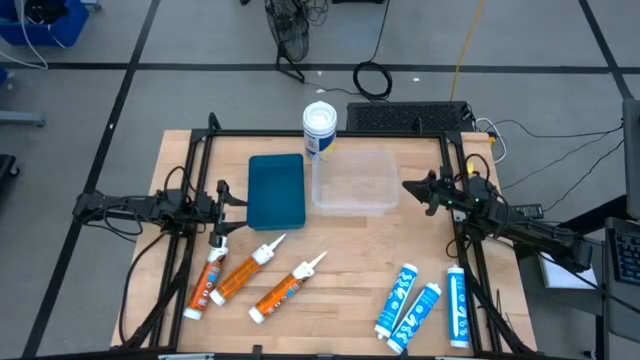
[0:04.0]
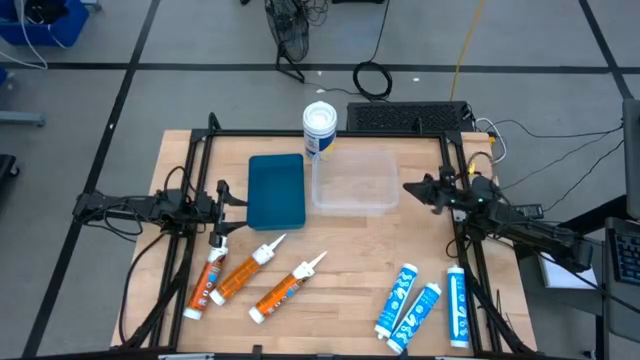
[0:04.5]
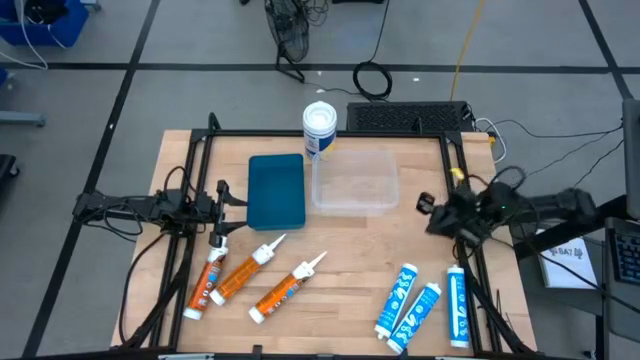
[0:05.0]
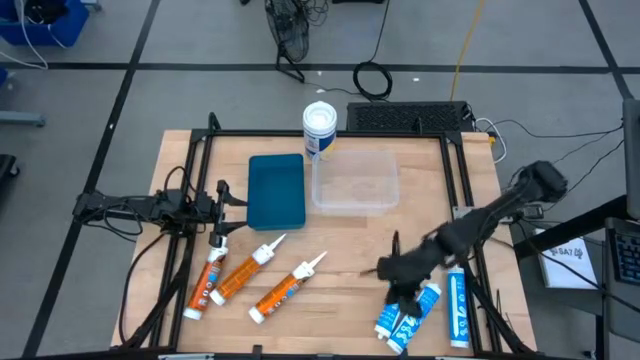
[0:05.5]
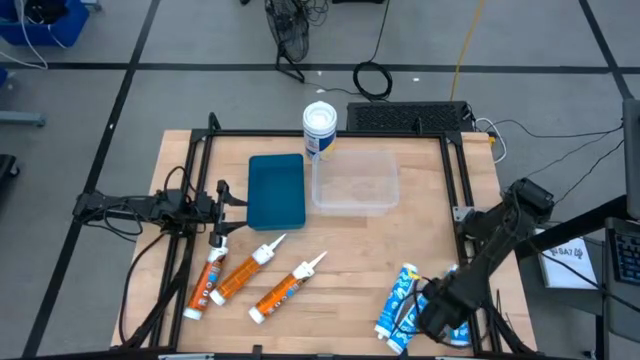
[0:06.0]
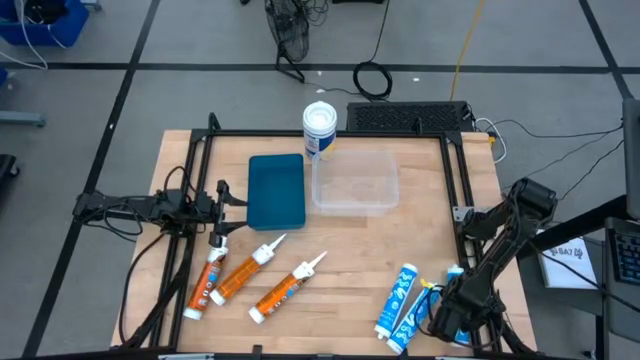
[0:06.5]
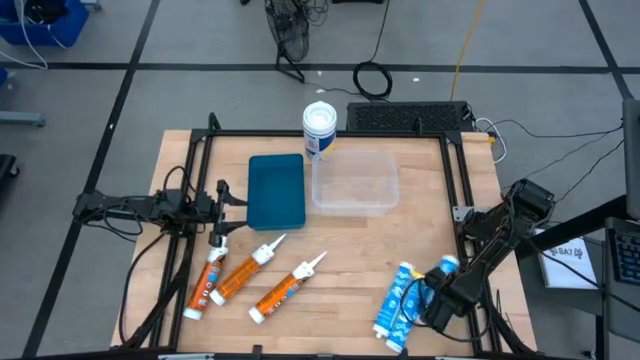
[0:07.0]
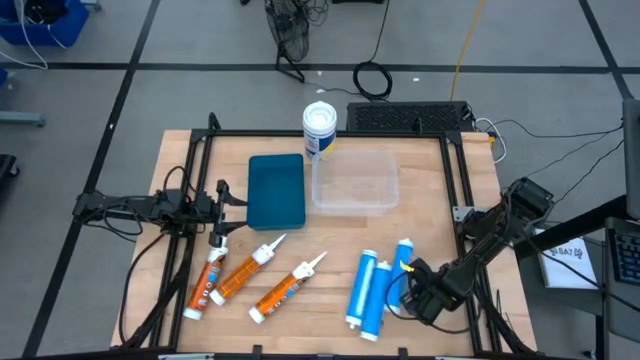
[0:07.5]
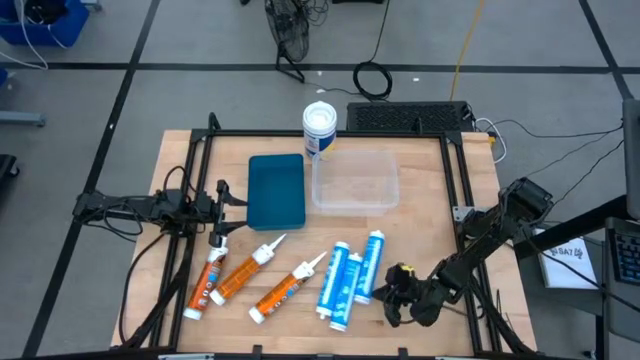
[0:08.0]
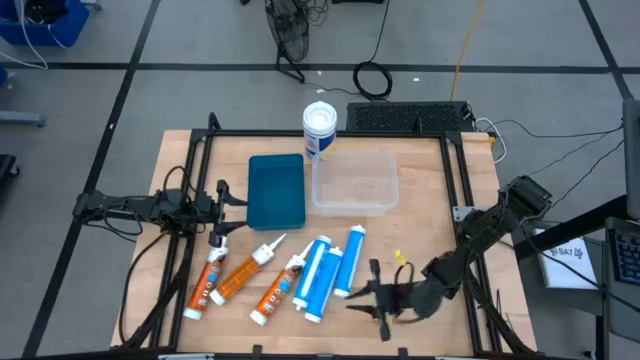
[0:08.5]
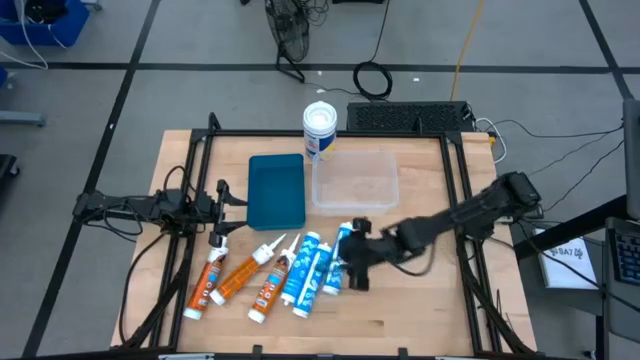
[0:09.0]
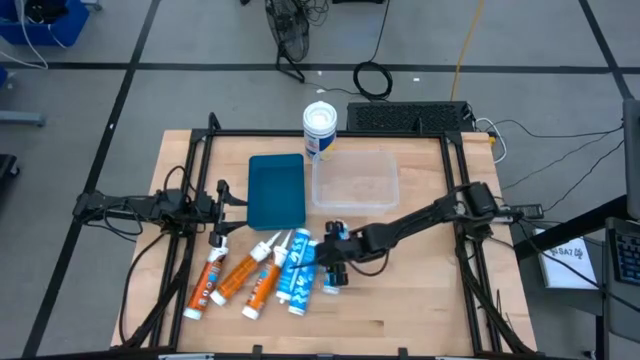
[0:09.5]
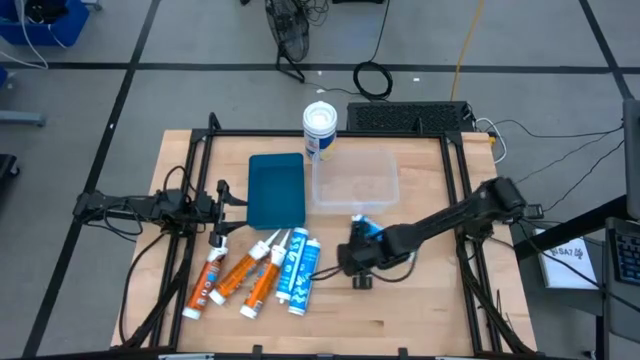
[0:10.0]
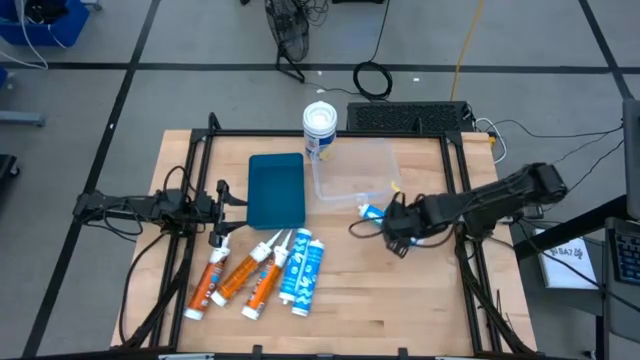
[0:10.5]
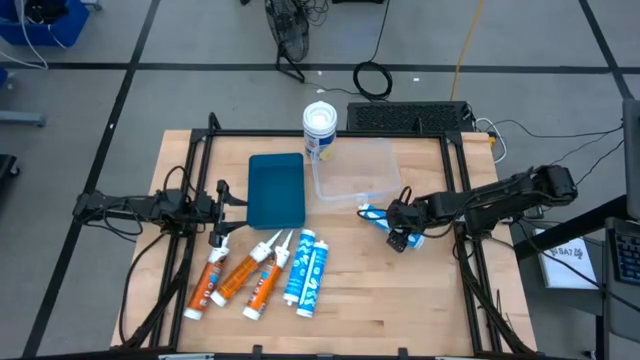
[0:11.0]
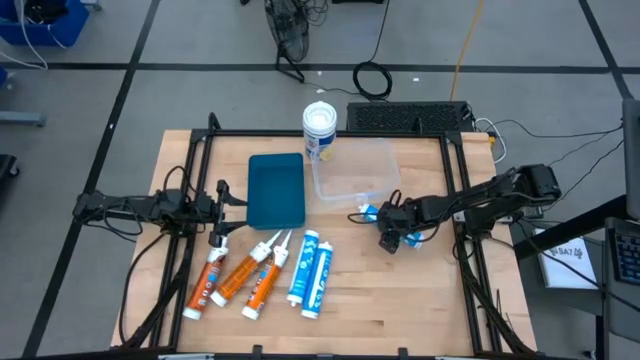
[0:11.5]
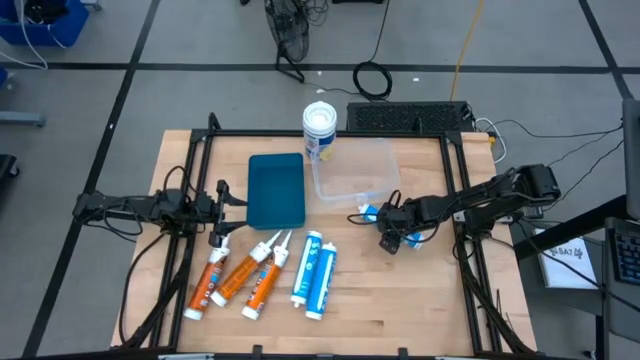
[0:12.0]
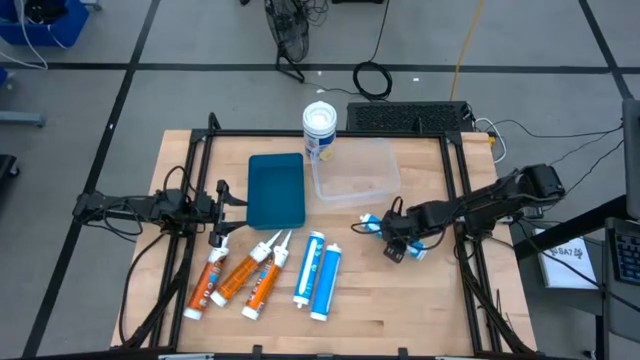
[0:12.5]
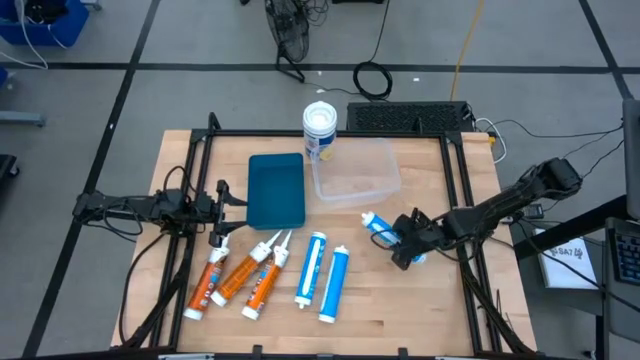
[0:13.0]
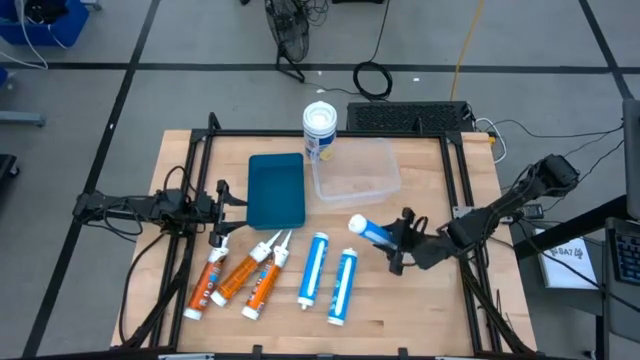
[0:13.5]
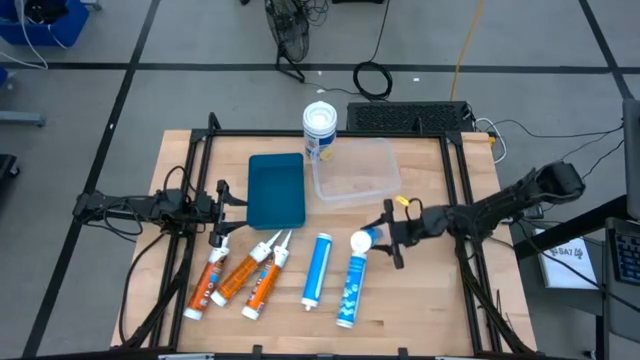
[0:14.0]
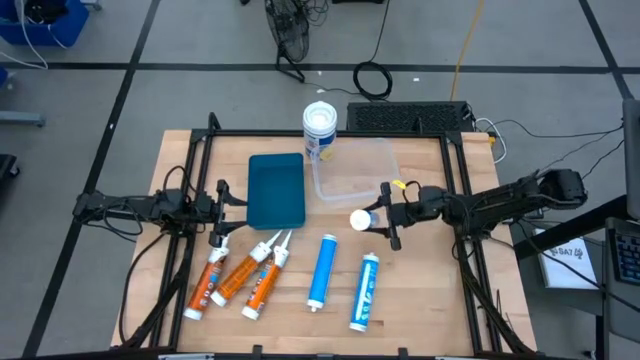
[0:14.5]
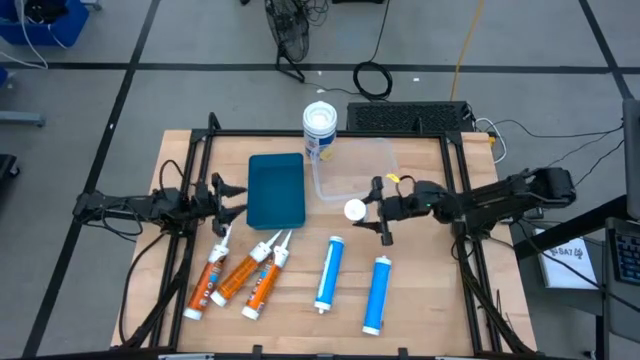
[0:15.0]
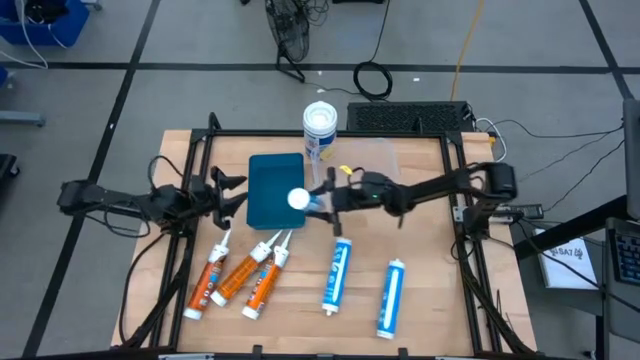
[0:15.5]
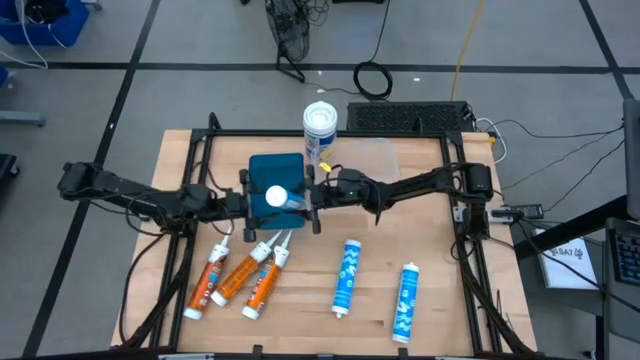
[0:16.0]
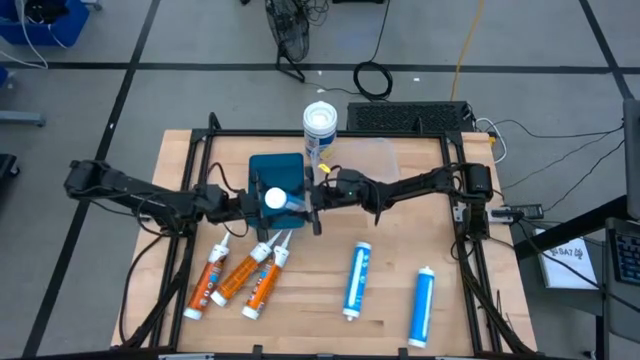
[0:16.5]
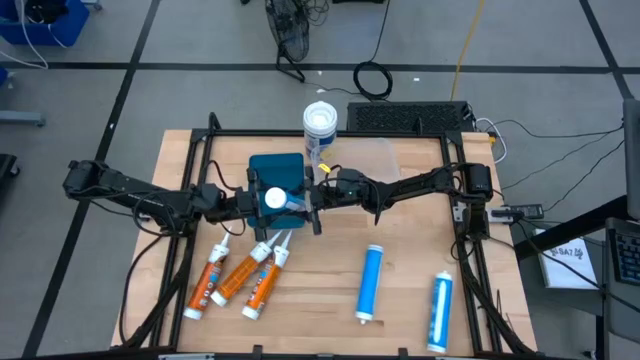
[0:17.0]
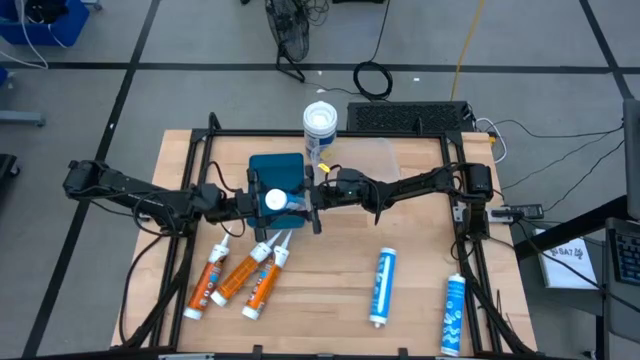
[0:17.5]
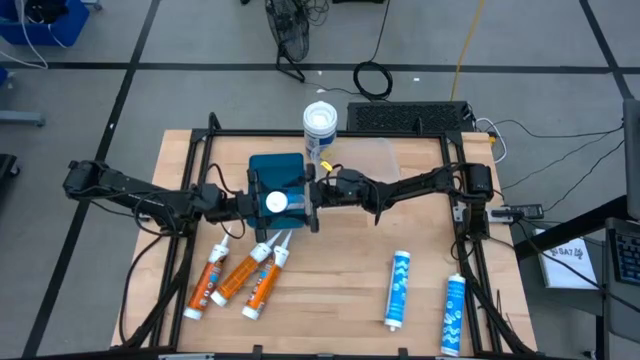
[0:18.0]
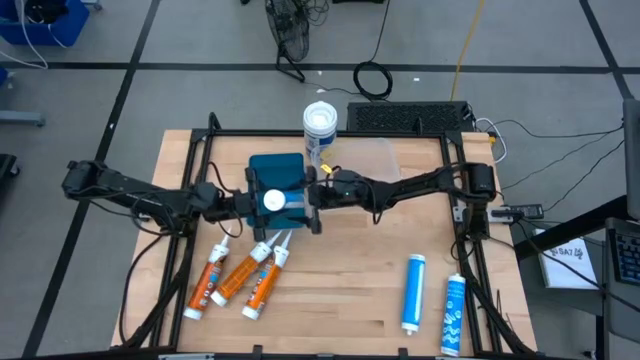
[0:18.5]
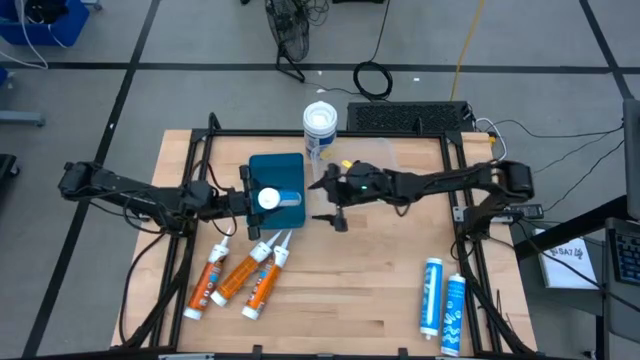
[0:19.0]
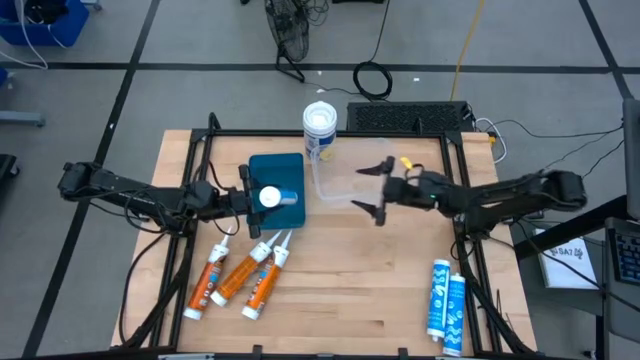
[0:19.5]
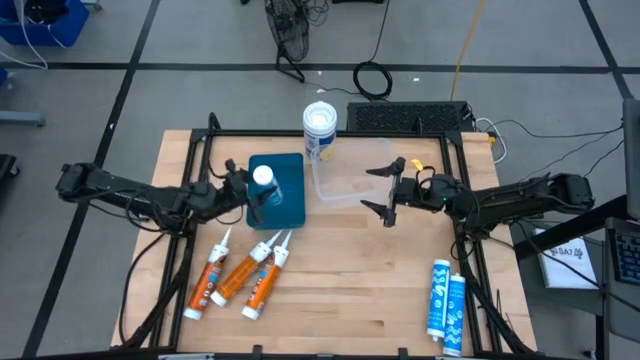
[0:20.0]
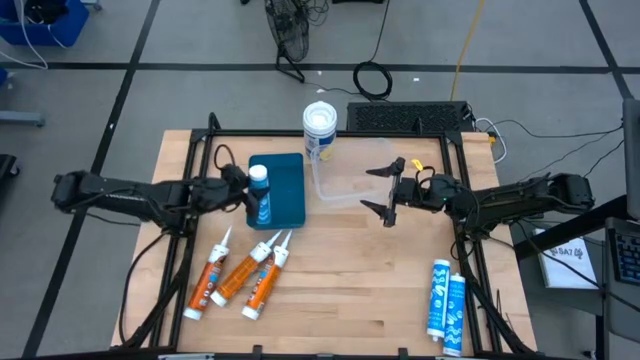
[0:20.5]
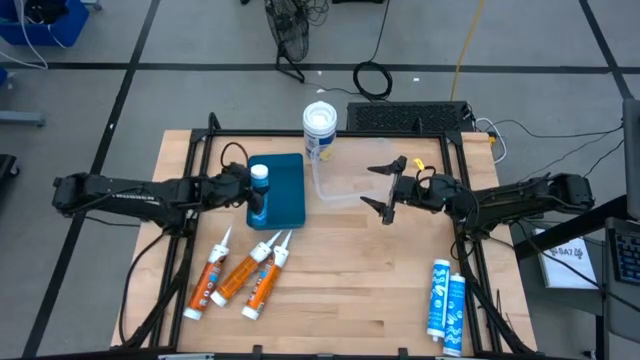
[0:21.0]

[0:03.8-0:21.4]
Task: Pick & place silicon tubes, Sealant and Lysol wipes
Put the blue caulk tube into the blue bin

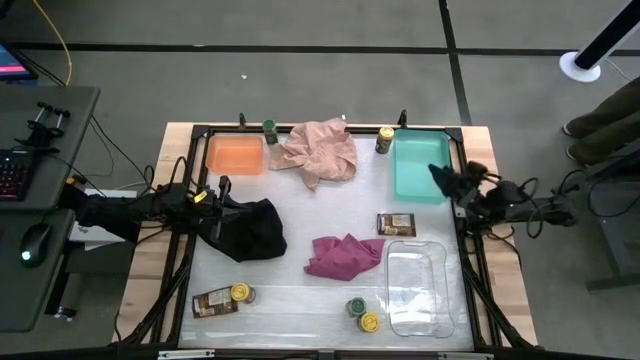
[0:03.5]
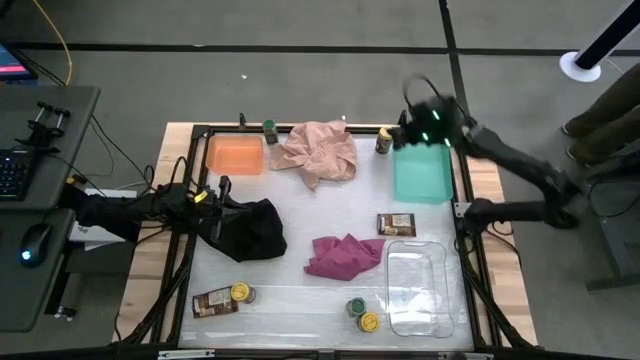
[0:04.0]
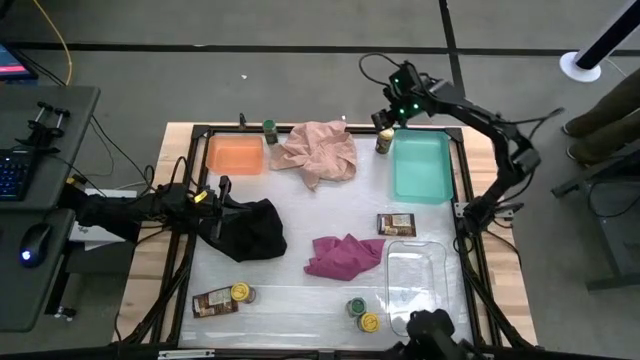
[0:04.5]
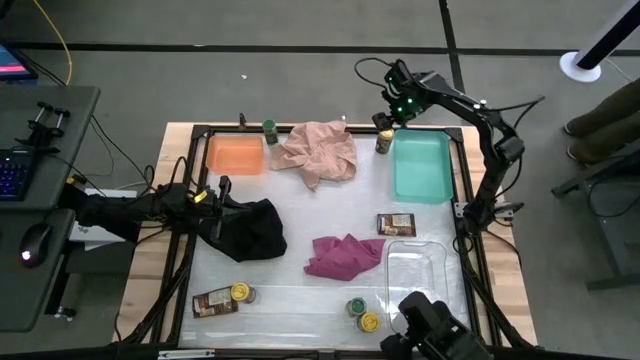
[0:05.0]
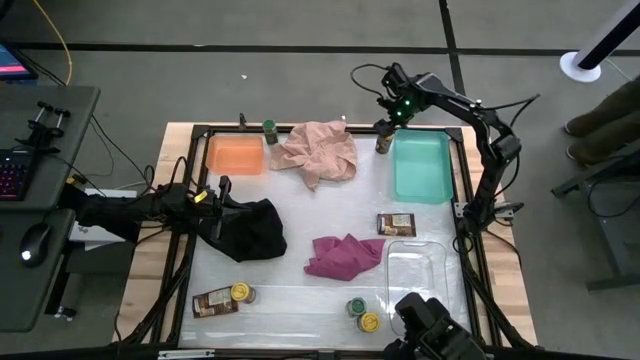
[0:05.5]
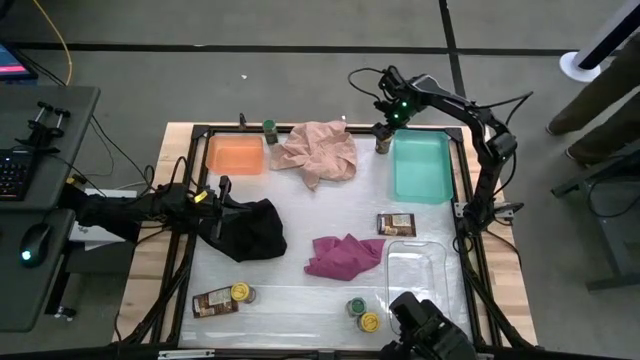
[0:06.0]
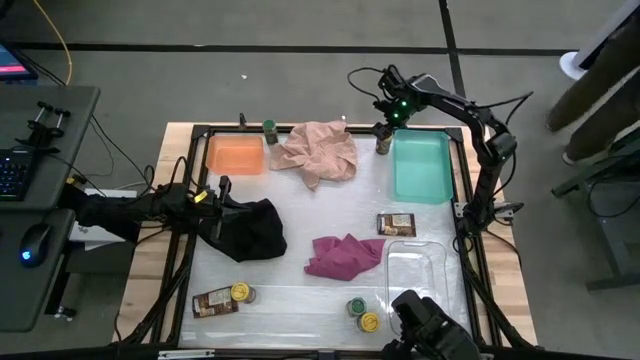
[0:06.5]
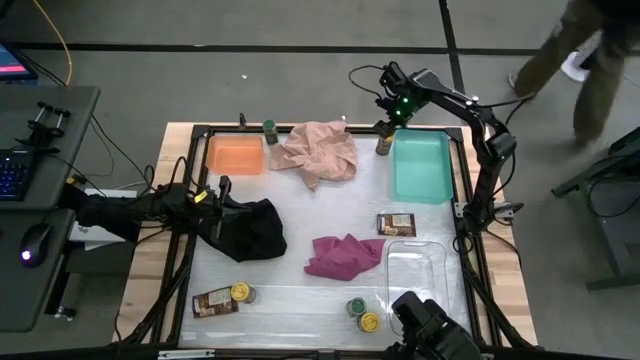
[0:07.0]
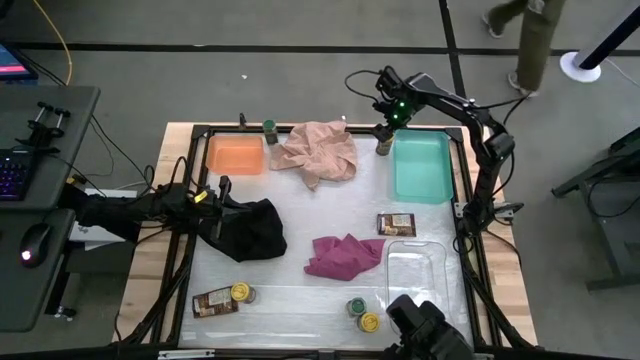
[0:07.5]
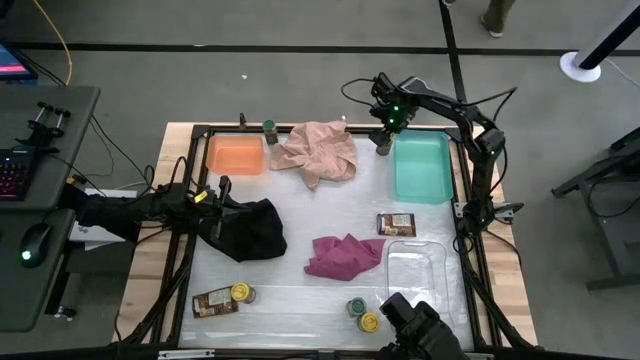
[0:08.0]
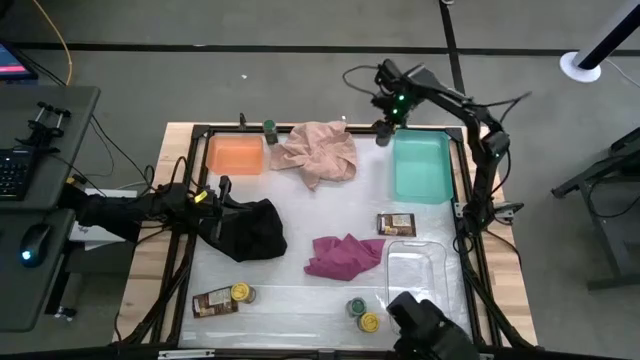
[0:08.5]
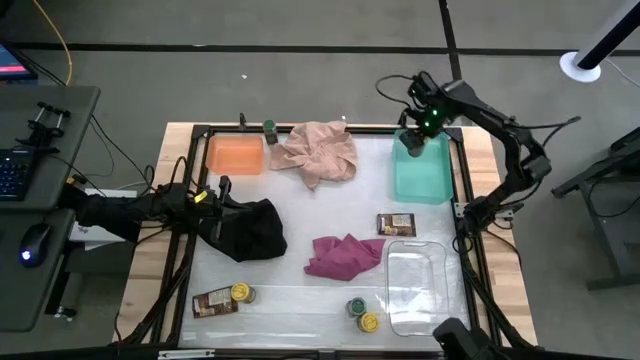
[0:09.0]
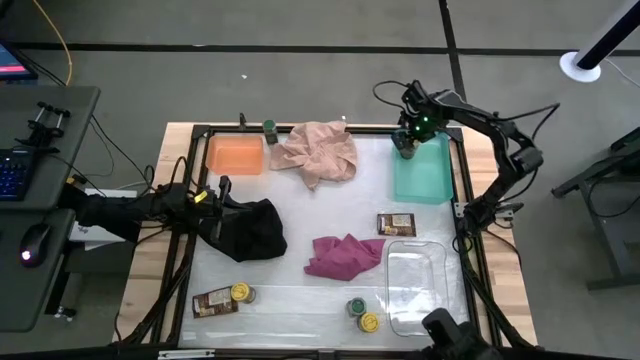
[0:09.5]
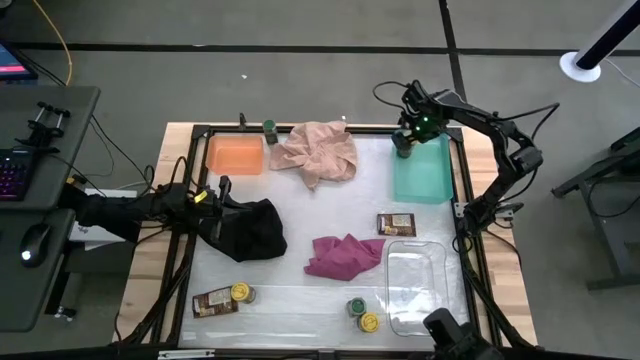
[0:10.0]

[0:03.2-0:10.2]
Task: Sort spices by type
Put the top yellow seasoning bottle into the blue bin
